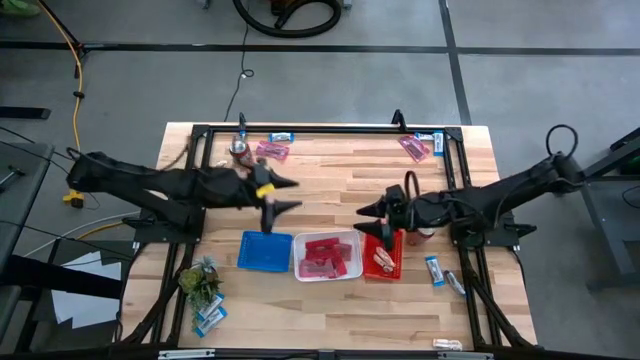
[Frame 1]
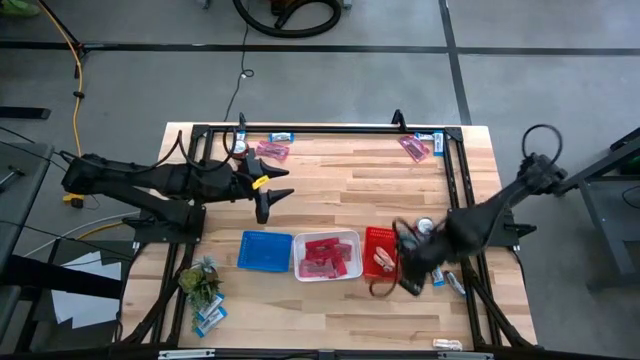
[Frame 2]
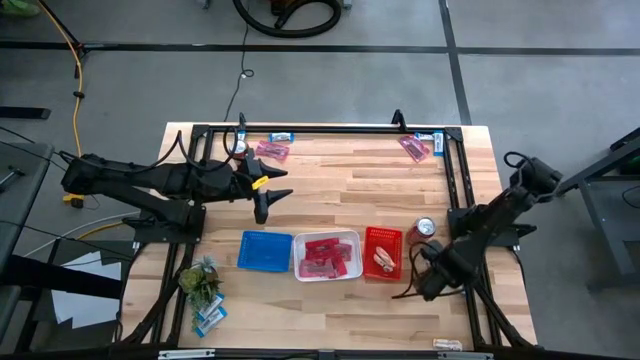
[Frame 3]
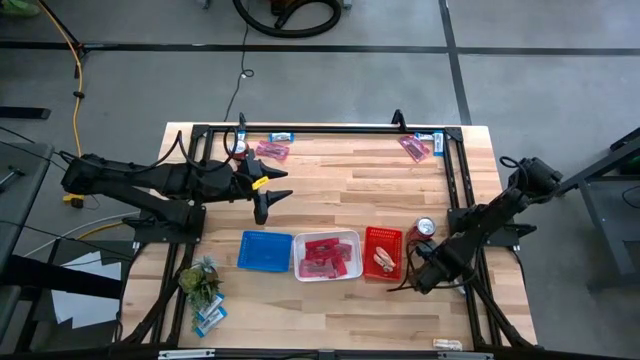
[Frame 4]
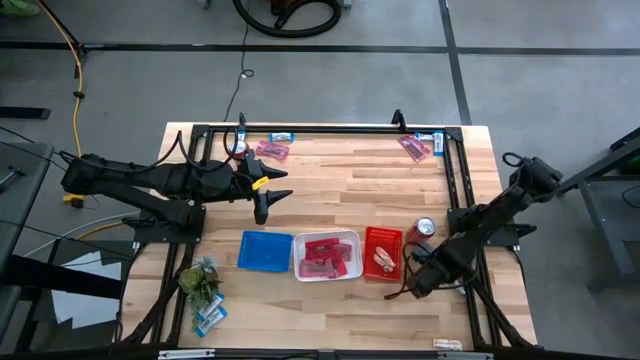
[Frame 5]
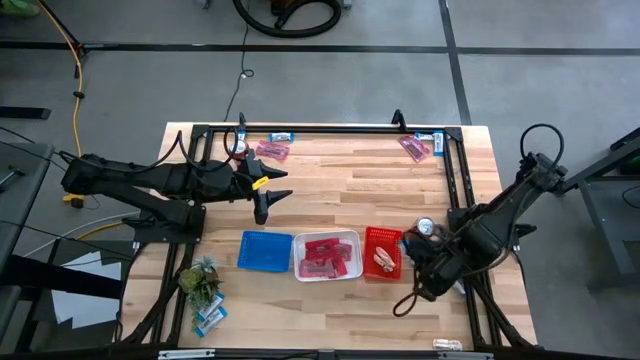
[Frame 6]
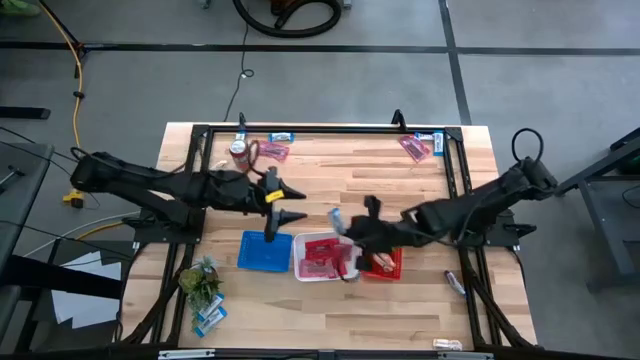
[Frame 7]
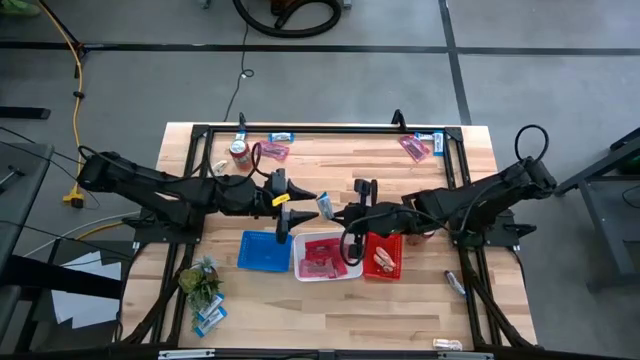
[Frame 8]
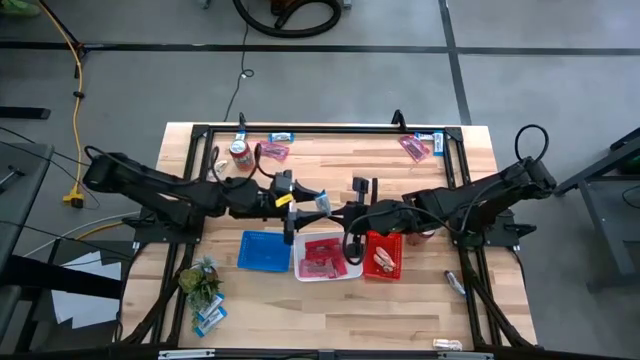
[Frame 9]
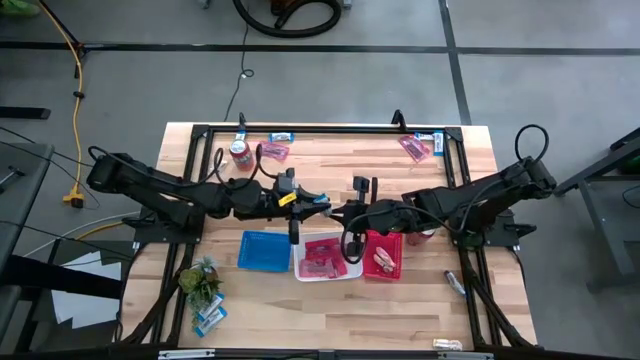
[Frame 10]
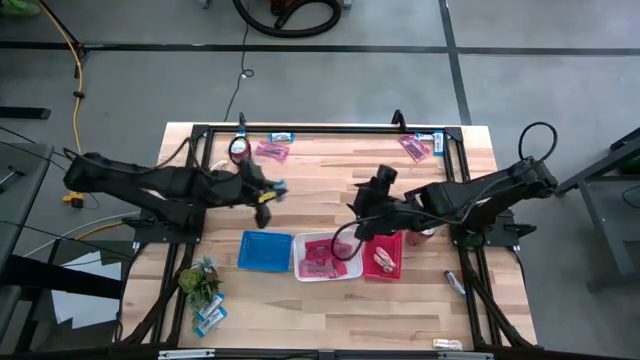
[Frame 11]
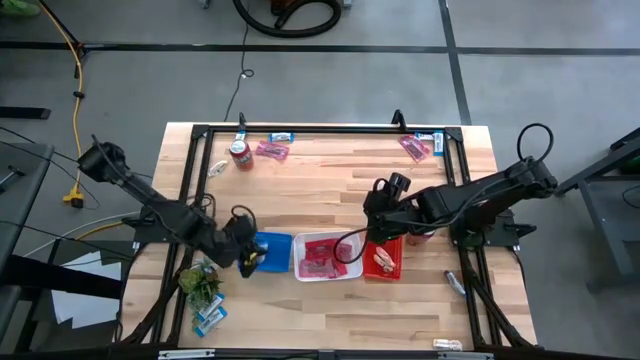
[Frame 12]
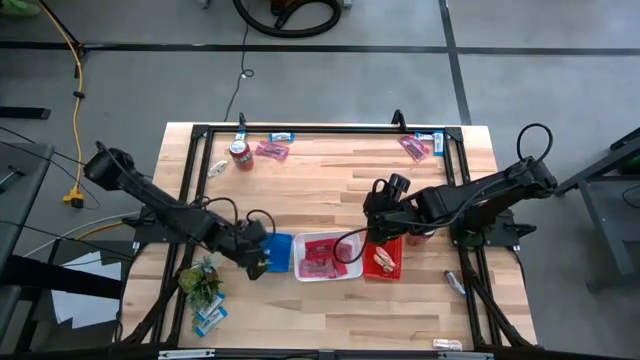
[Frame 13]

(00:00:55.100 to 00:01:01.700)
Task: Sort candy
Put the white chocolate into the blue bin

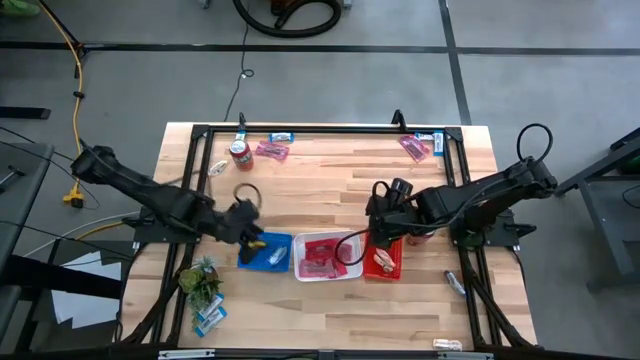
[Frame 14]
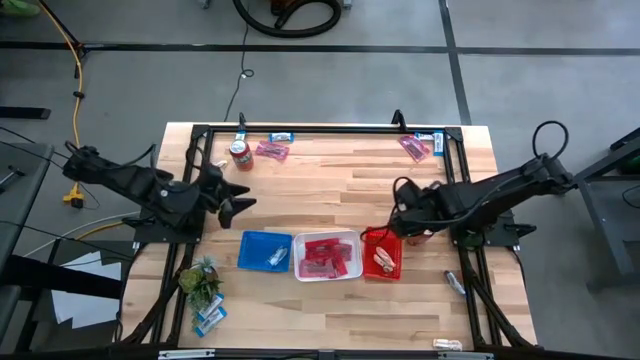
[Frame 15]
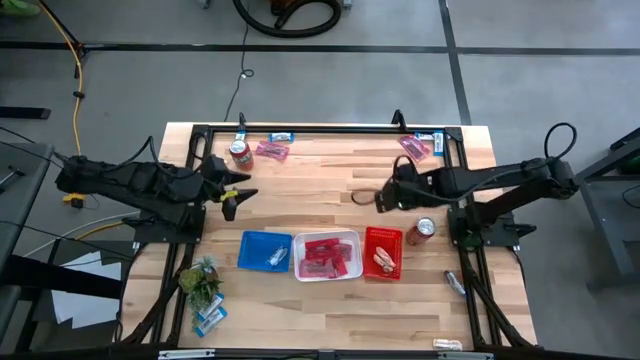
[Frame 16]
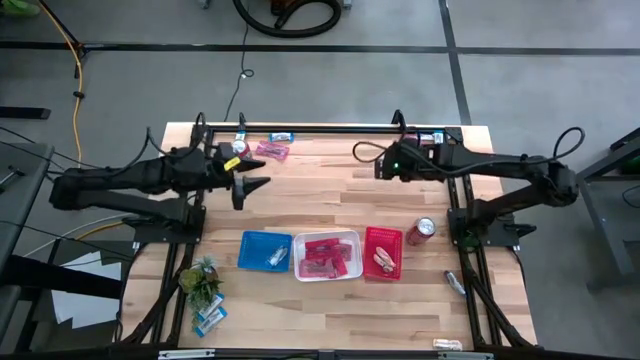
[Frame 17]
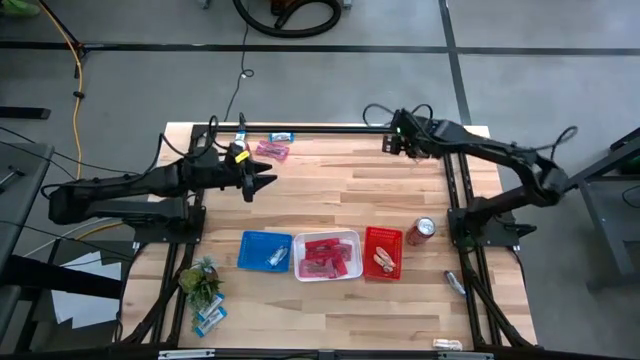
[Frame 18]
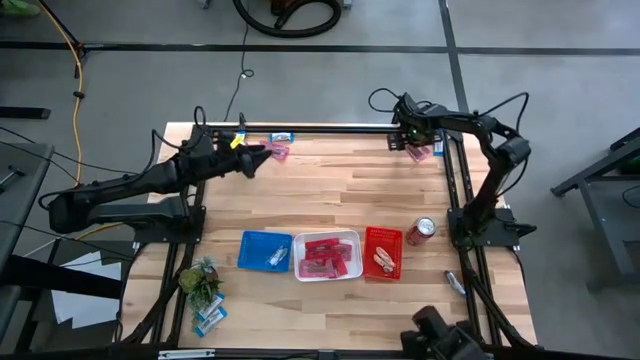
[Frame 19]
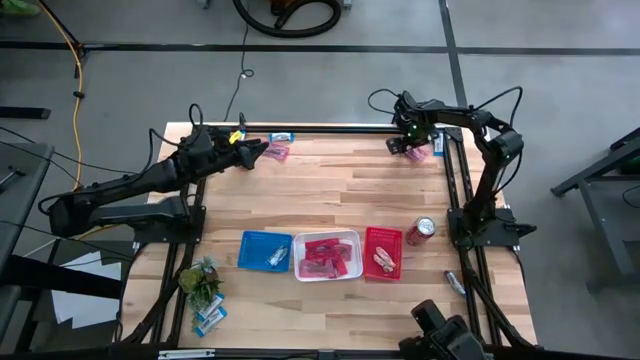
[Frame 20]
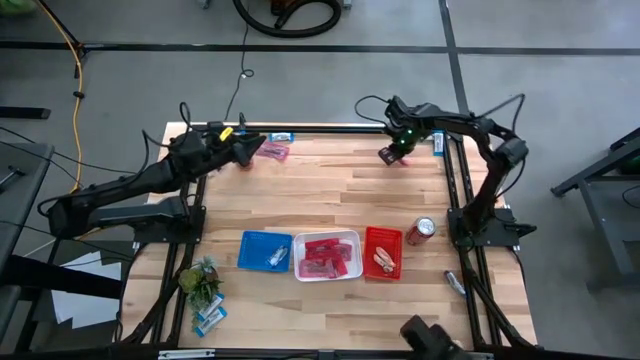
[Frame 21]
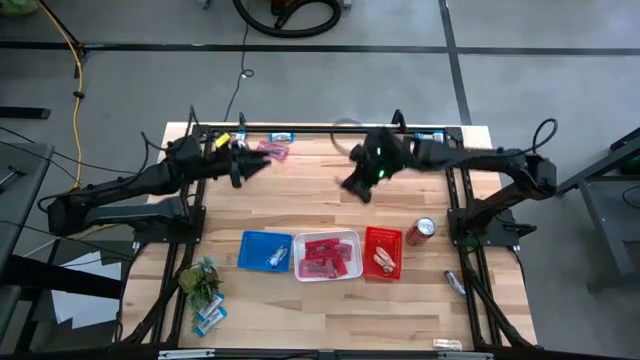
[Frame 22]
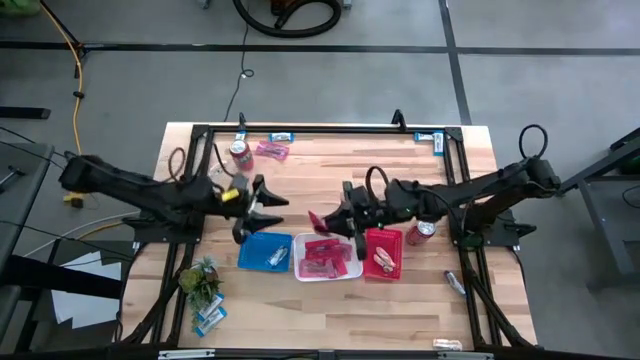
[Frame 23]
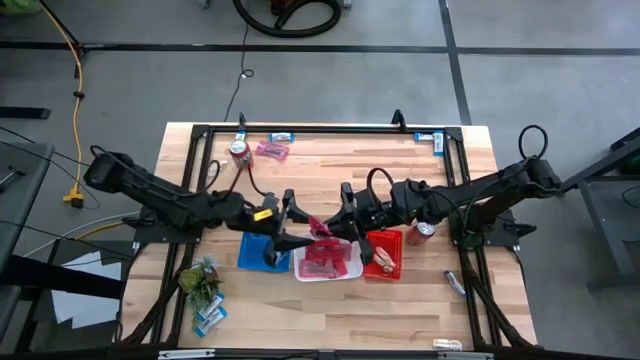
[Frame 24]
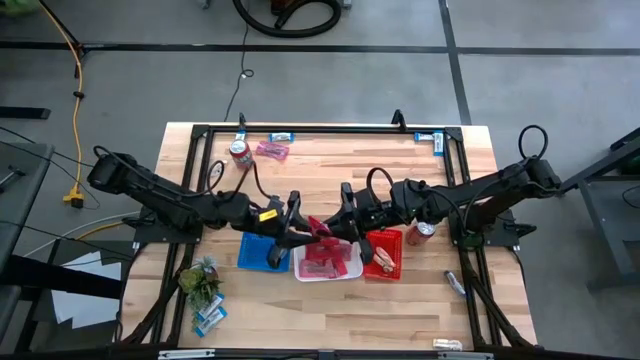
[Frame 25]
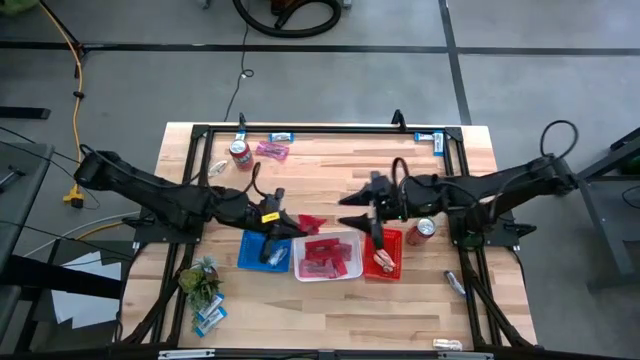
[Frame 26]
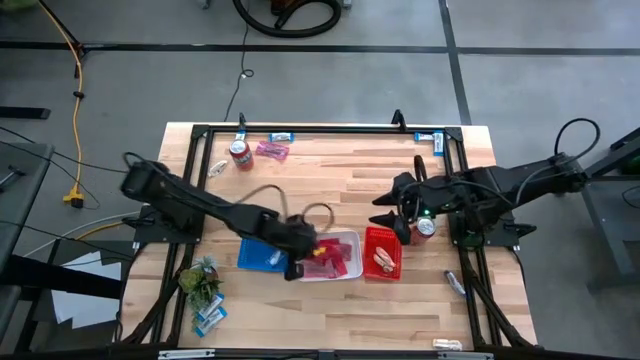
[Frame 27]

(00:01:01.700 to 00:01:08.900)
Put the pink candy into the white bin

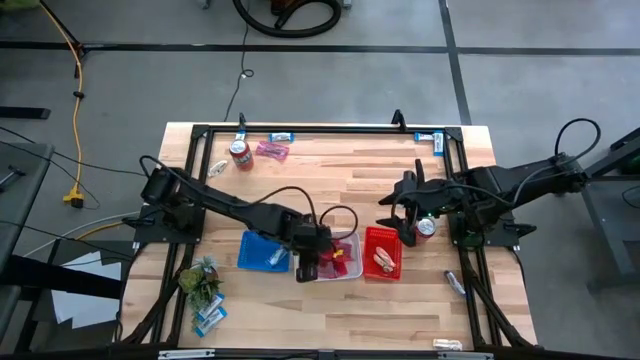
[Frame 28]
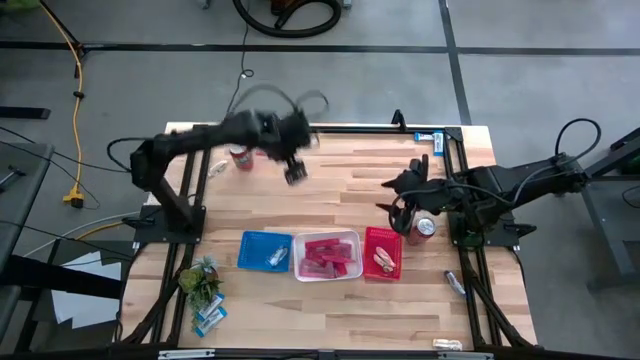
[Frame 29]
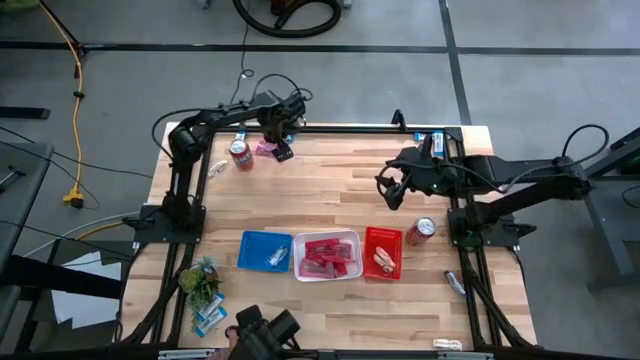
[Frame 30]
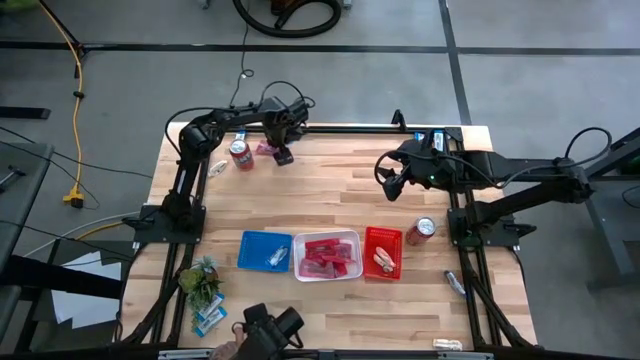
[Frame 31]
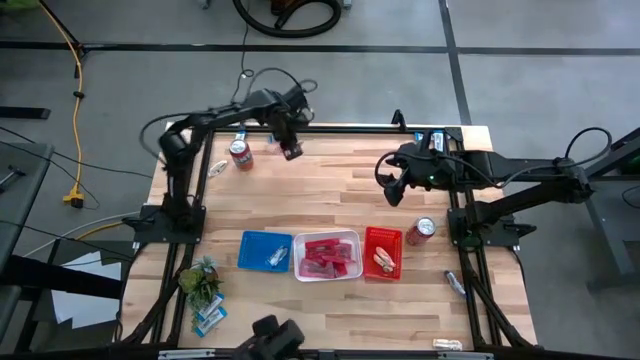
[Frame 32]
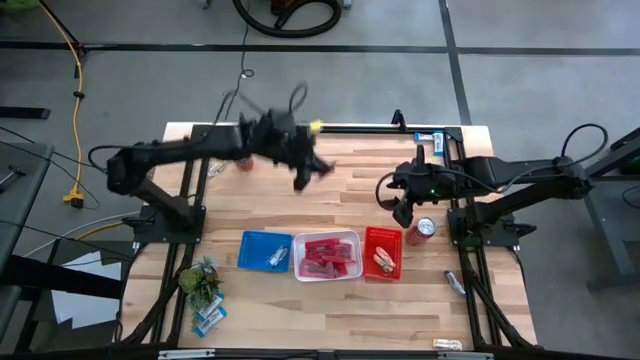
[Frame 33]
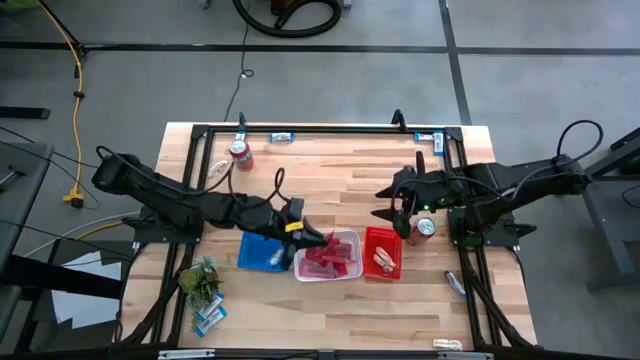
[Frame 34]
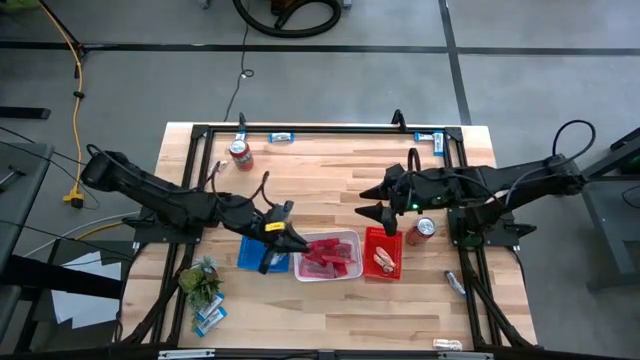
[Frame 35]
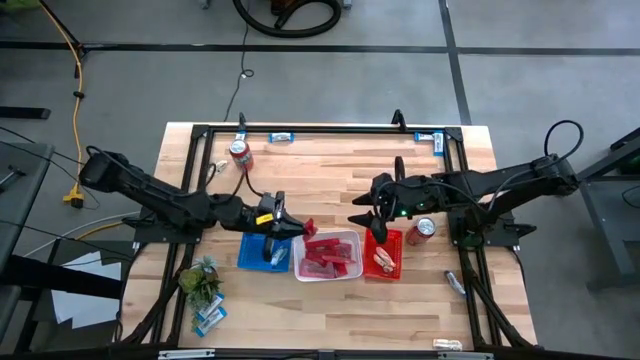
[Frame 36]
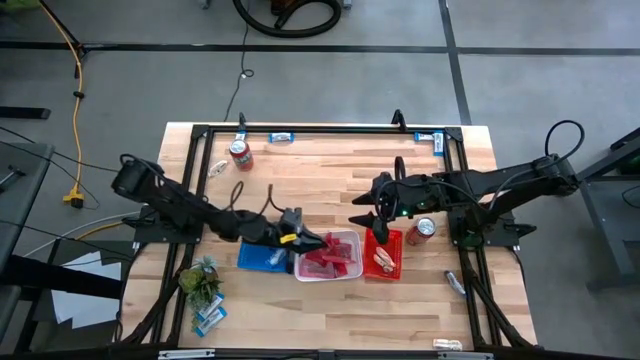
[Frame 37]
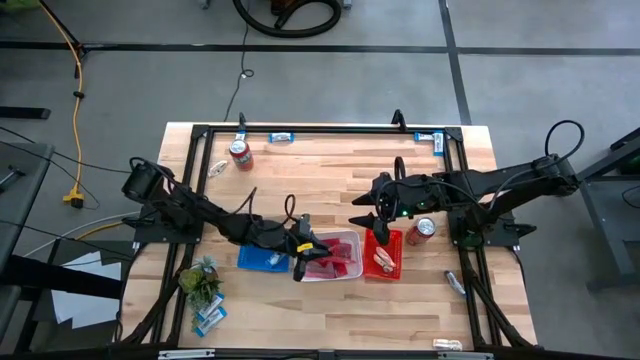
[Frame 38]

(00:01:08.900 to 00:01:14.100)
Put the pink candy into the white bin

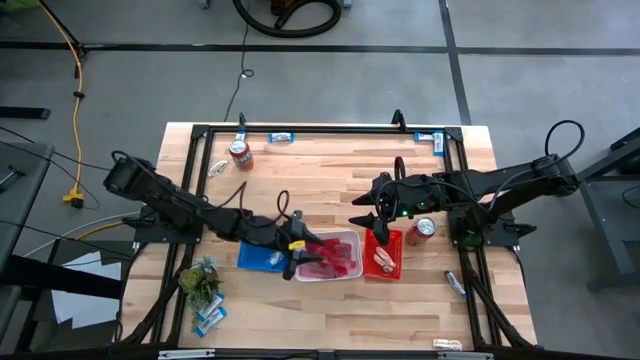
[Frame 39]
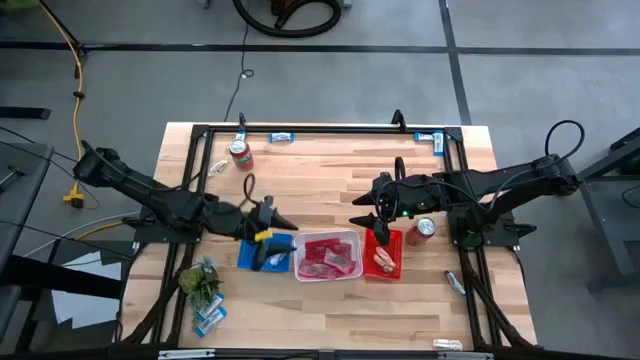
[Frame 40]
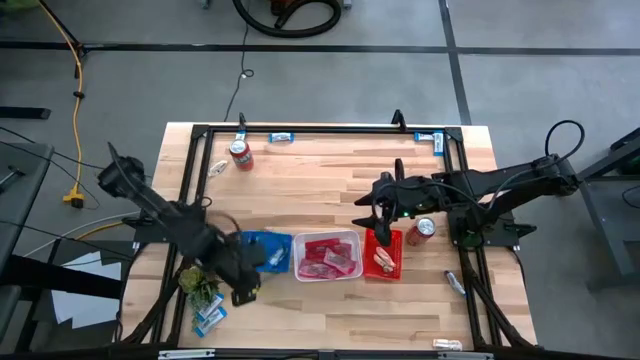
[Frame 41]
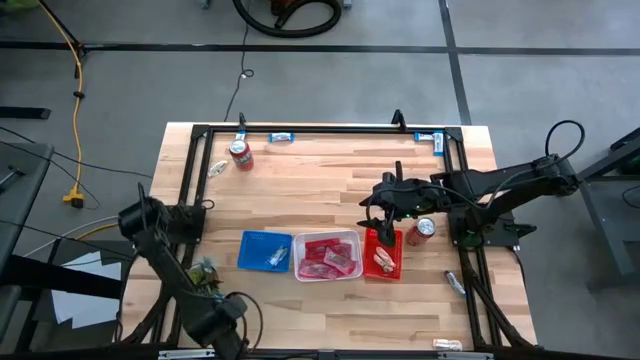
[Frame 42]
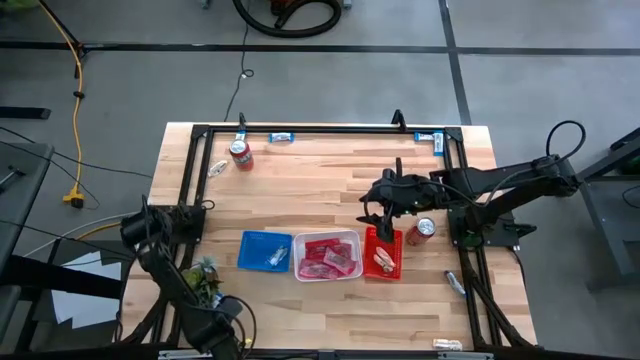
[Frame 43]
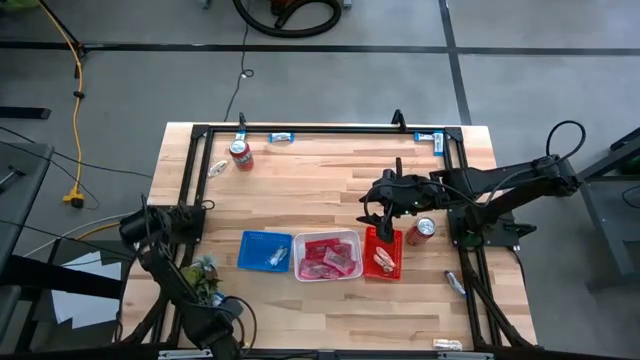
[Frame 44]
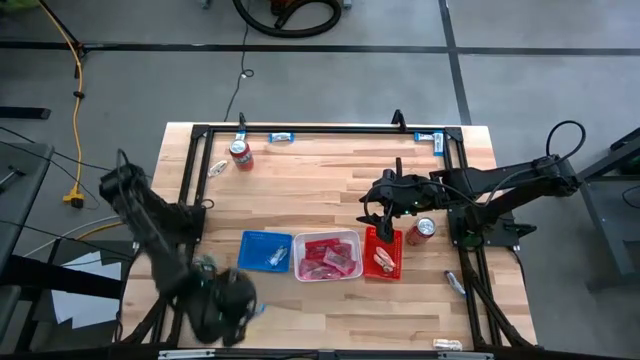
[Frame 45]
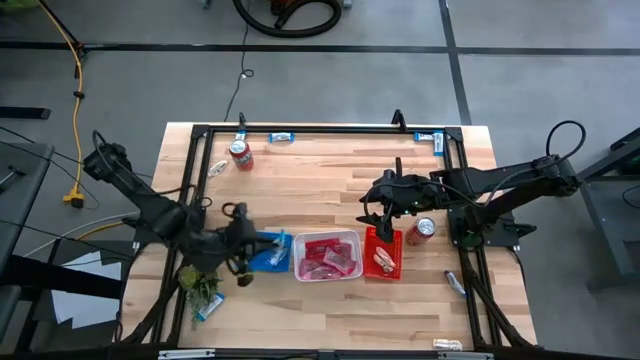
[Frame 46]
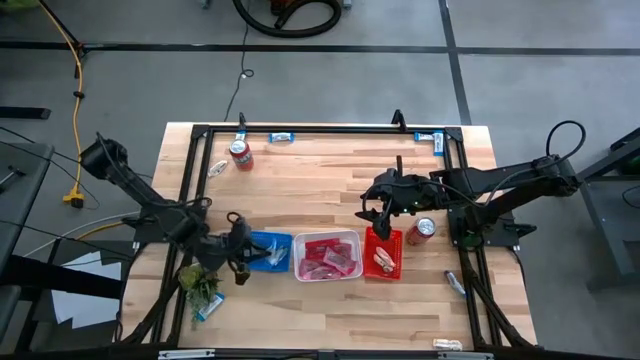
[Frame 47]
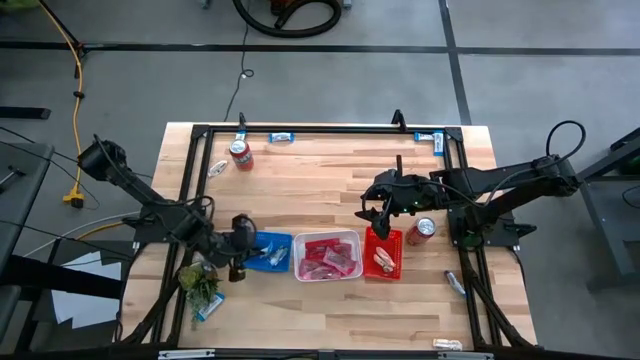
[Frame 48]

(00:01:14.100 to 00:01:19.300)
Put the white chocolate into the blue bin
